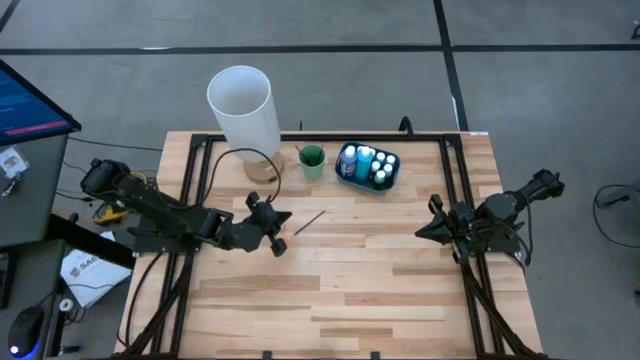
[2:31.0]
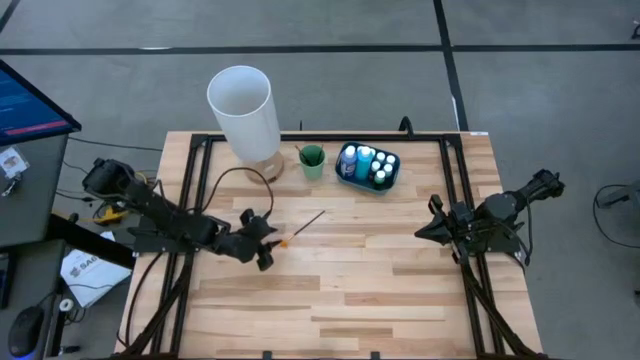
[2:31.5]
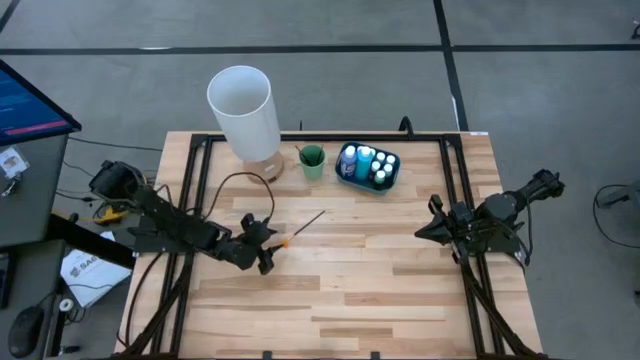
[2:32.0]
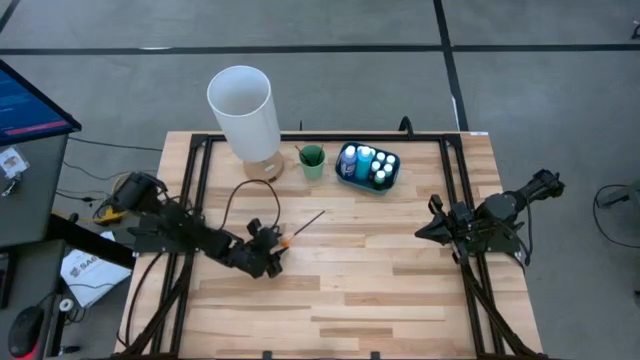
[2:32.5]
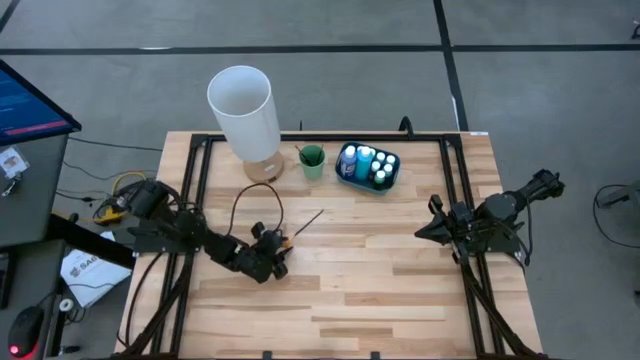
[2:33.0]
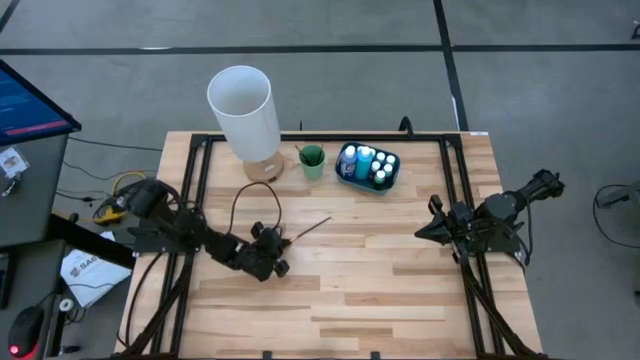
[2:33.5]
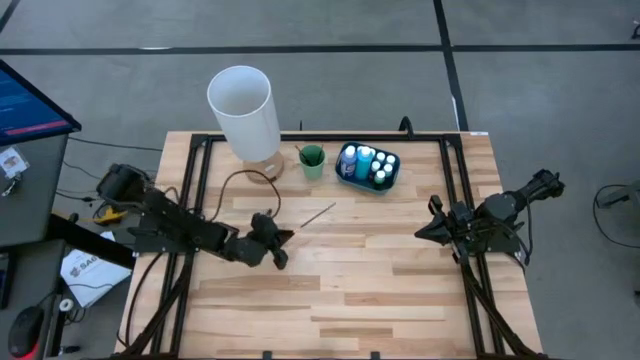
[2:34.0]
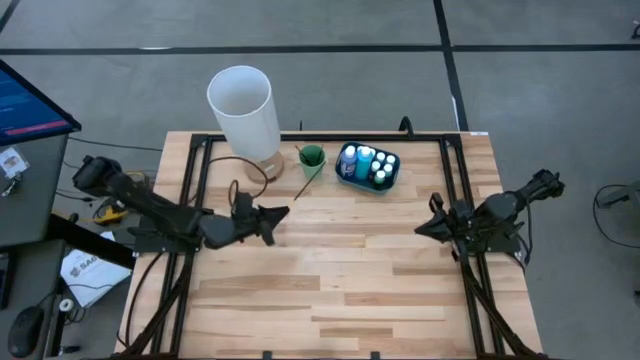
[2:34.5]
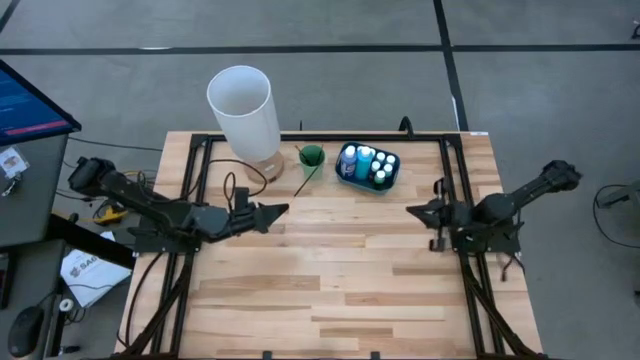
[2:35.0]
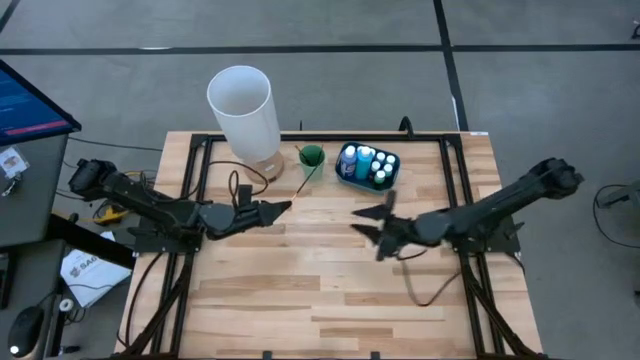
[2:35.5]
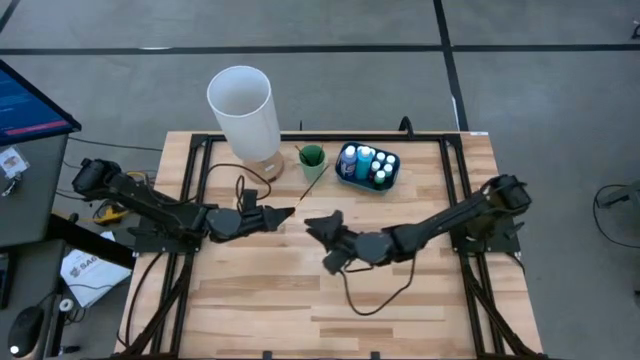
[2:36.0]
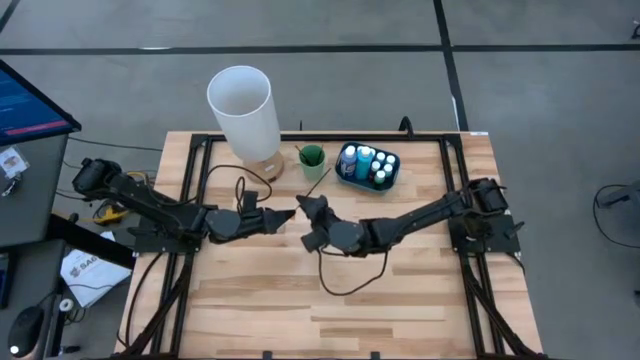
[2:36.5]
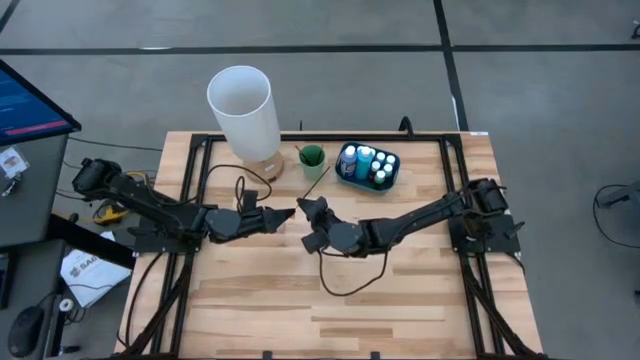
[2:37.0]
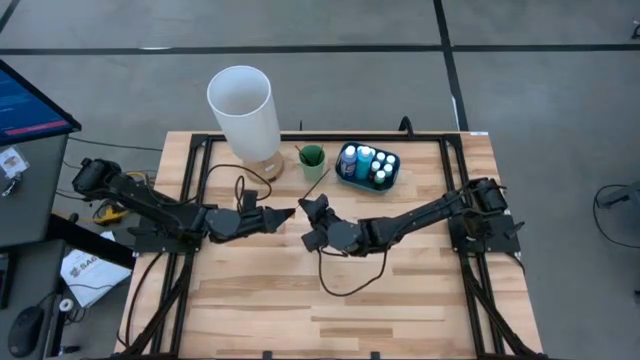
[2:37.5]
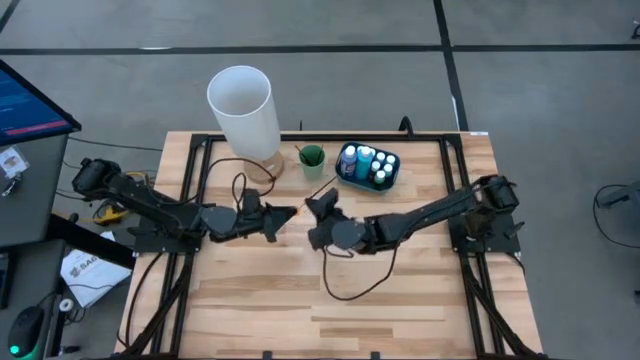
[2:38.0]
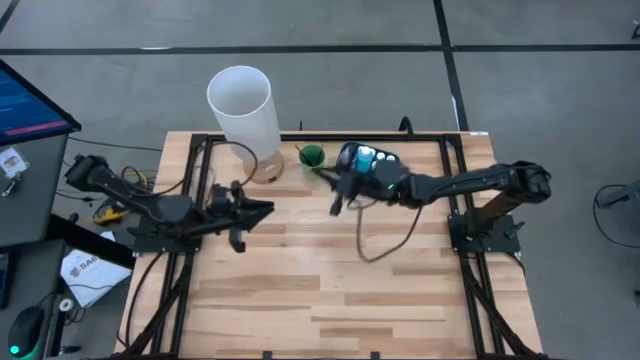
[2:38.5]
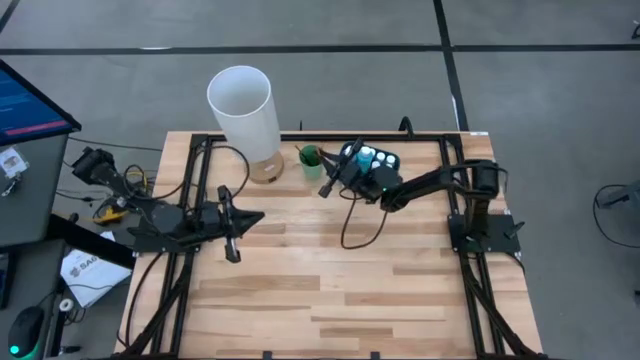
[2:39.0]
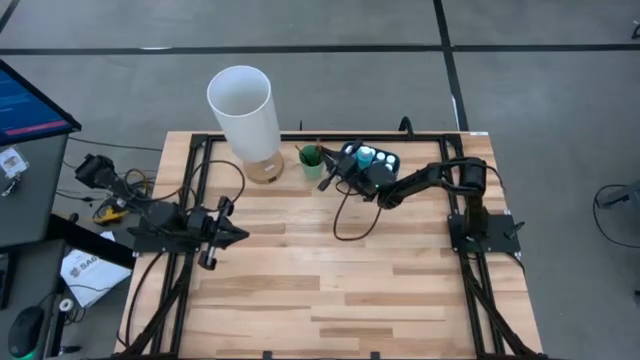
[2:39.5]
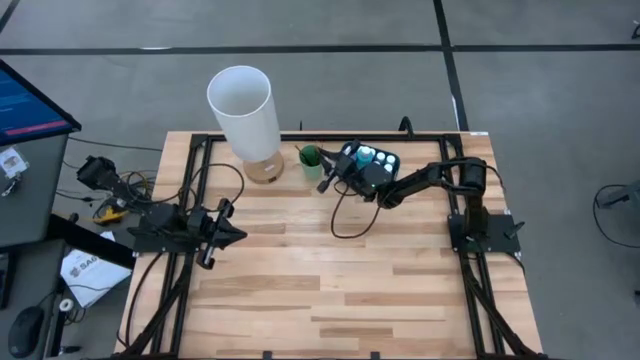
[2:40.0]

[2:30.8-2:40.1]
Task: Pick & Place Paint Supplies
Put the gold paint brush into the green cup

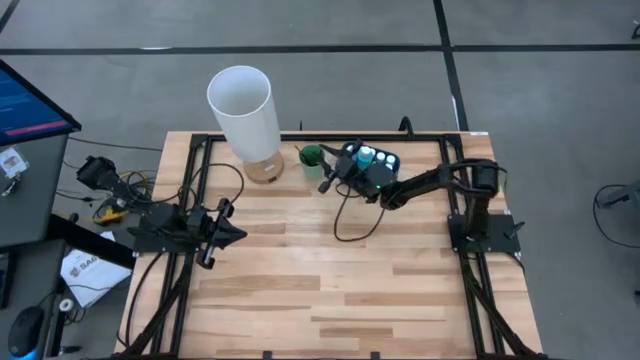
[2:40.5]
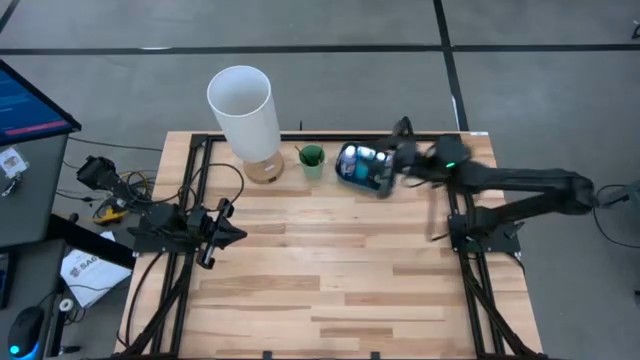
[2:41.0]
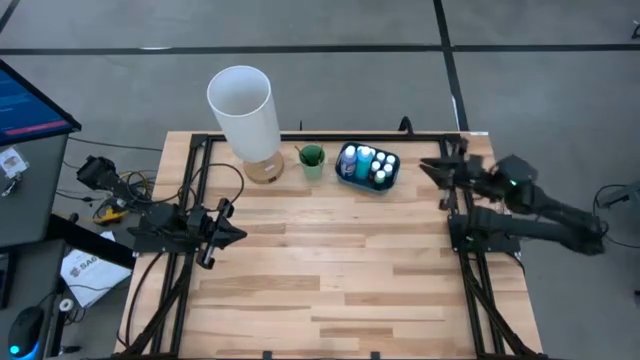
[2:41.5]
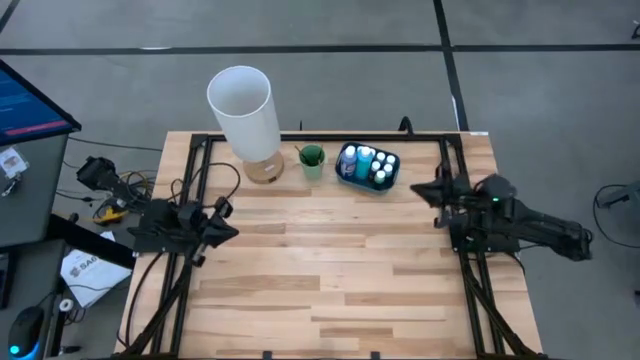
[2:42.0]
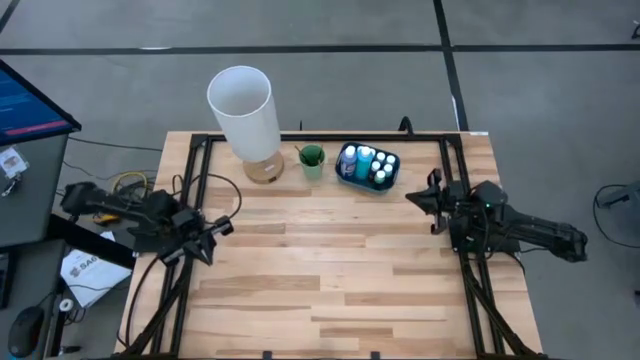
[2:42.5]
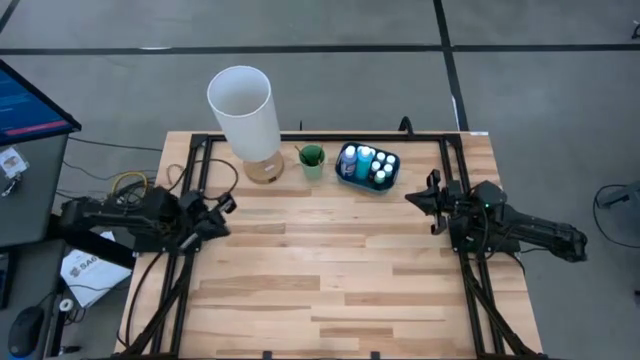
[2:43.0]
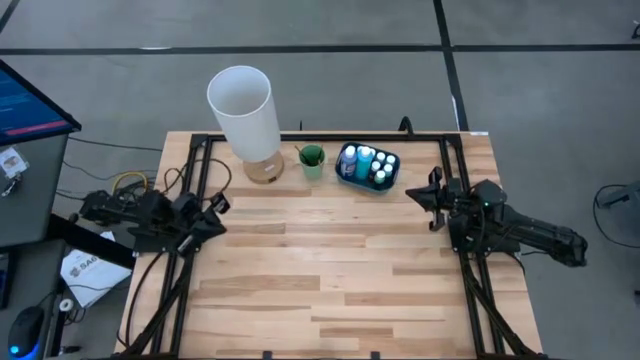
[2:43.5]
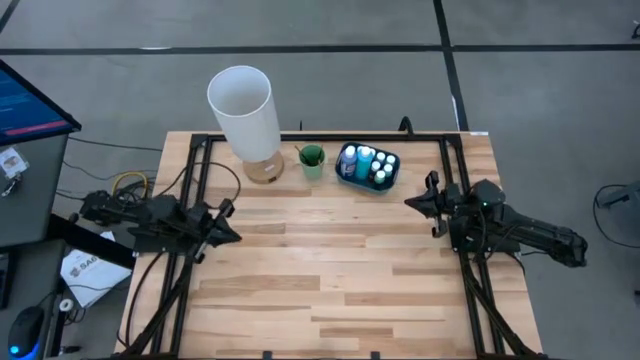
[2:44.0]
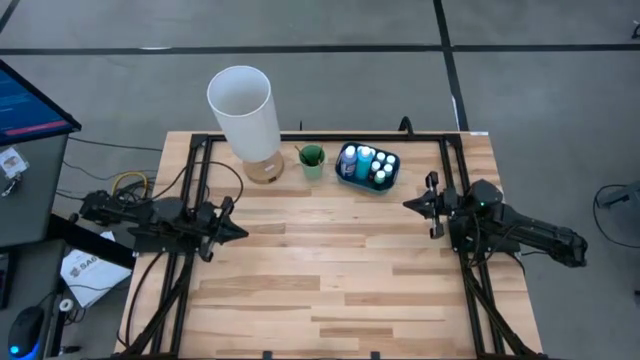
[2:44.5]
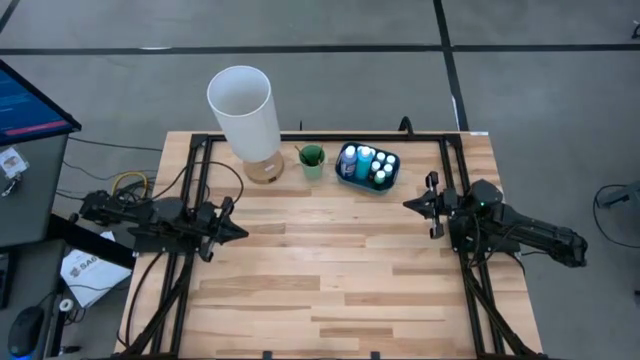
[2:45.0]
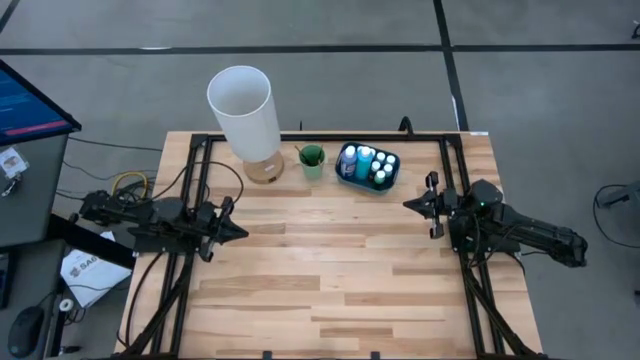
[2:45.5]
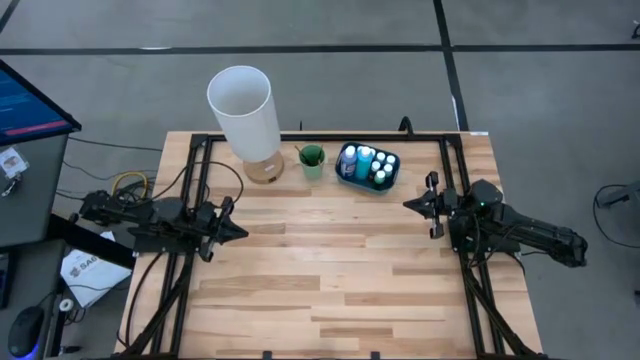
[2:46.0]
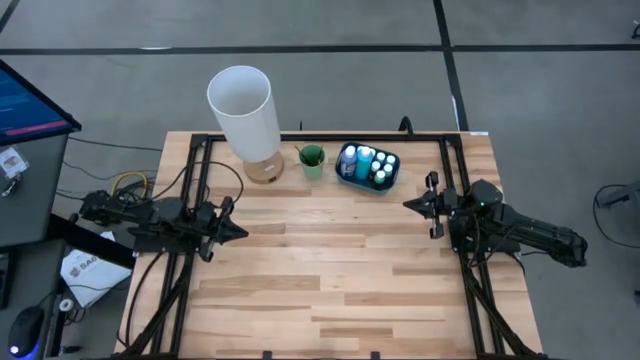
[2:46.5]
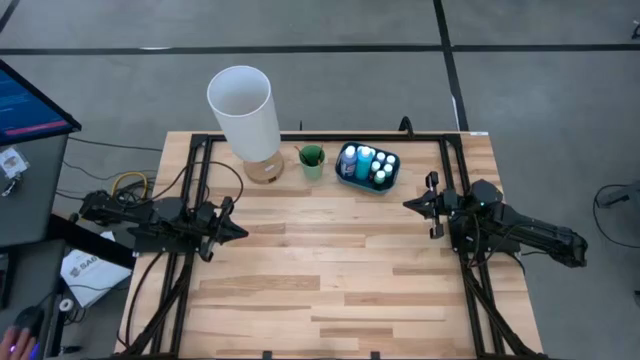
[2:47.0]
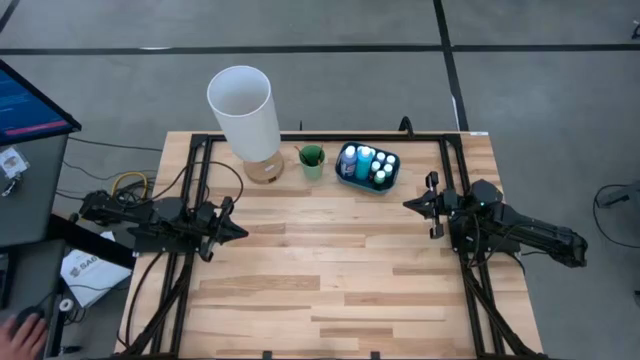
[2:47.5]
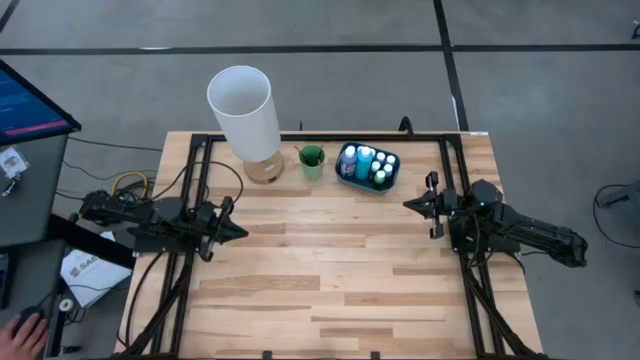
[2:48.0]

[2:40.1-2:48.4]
Return to Home Position

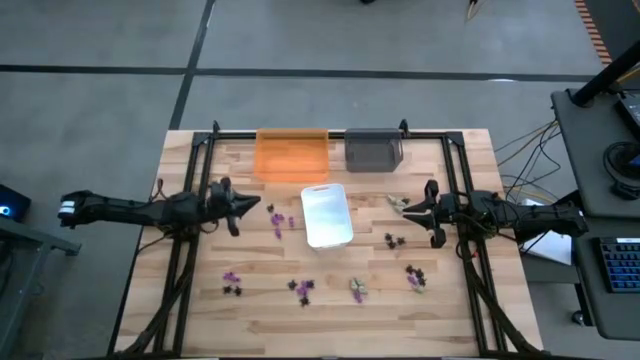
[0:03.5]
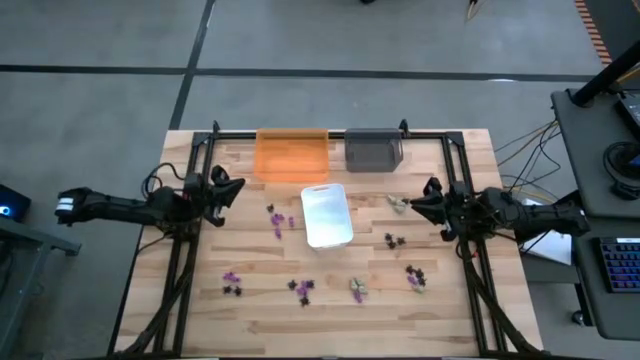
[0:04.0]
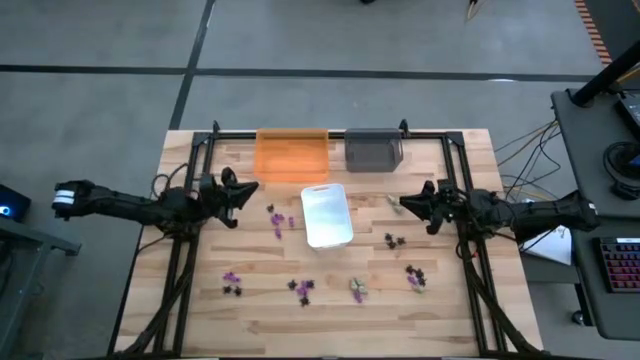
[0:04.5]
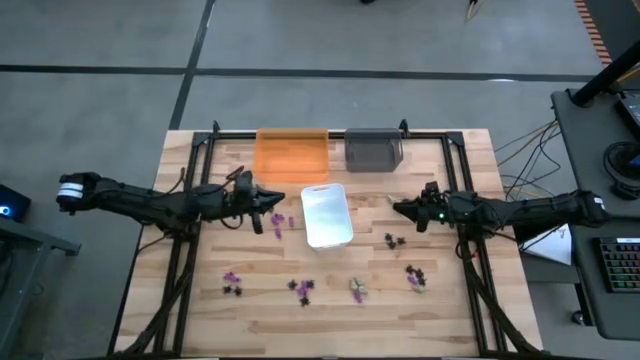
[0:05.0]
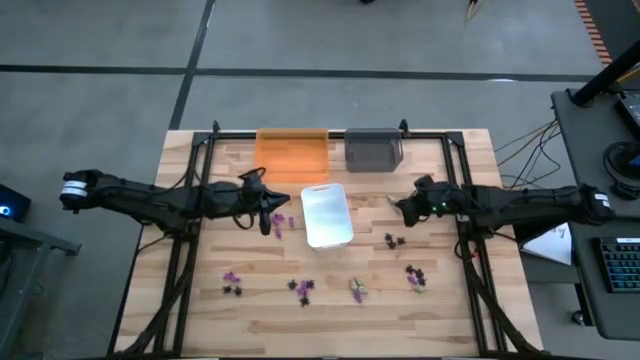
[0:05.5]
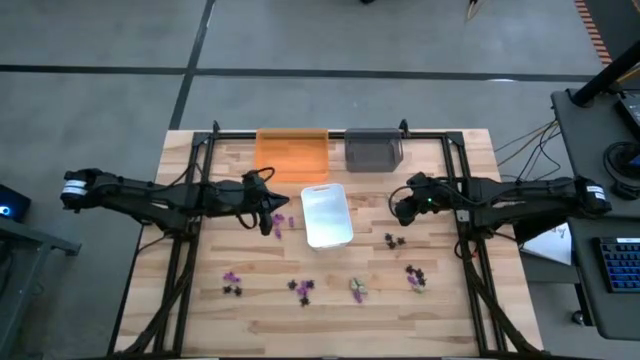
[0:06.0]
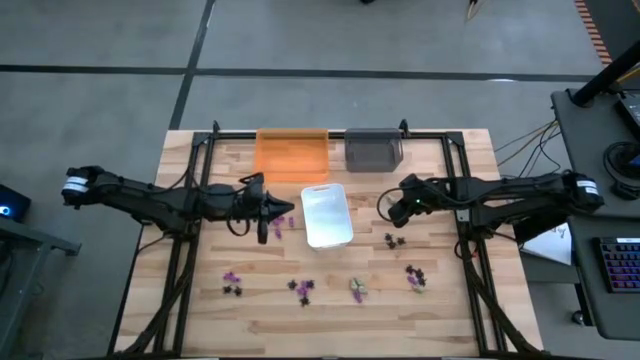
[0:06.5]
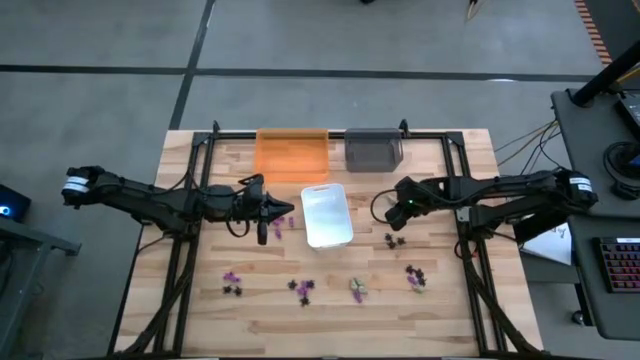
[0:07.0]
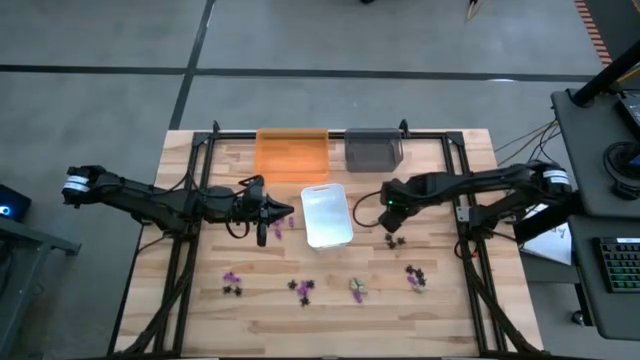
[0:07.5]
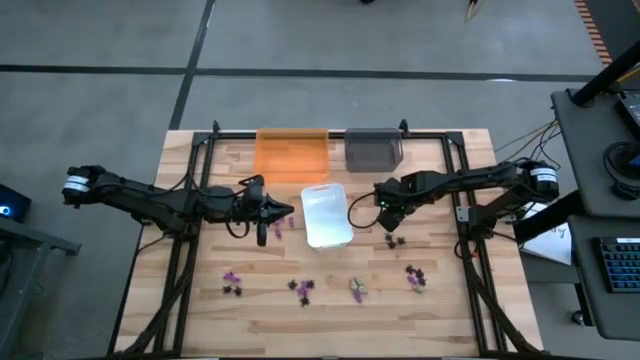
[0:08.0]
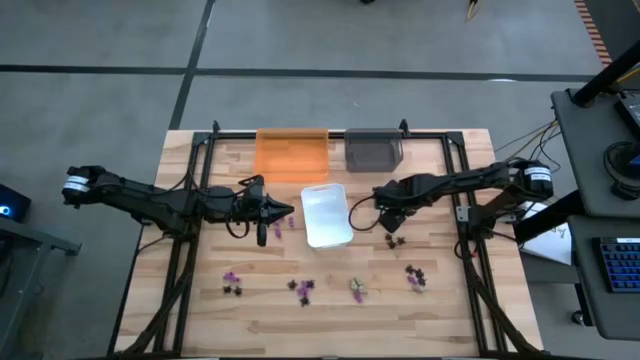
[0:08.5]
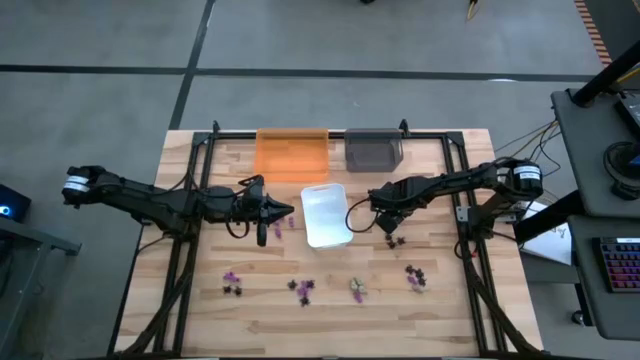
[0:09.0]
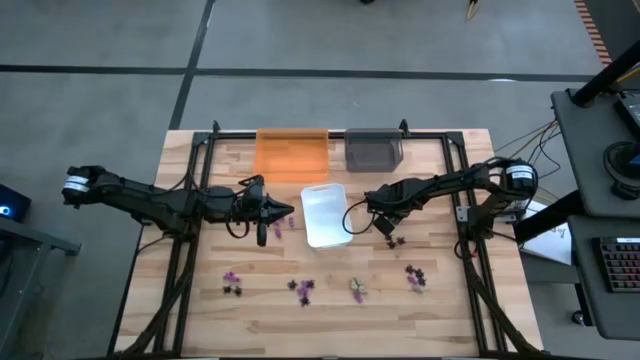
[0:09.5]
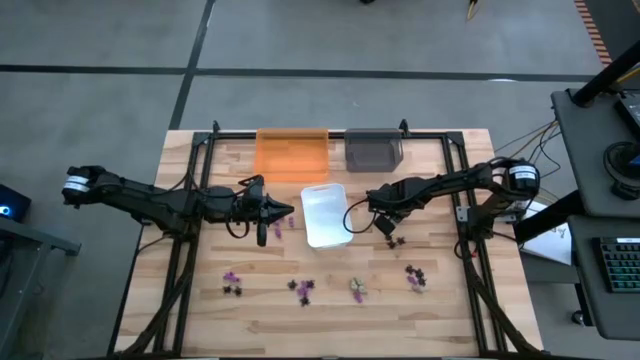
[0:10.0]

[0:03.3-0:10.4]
Task: Sort Halloween decoration
Put the white skull toy into the white bin
